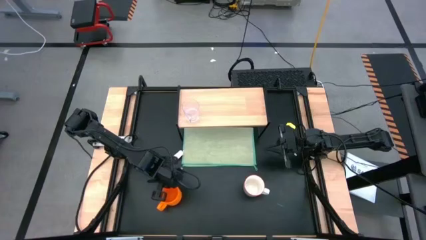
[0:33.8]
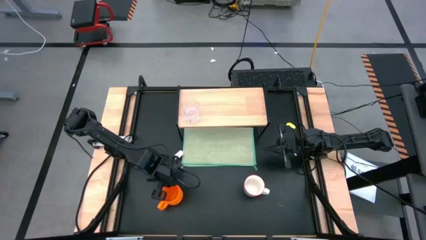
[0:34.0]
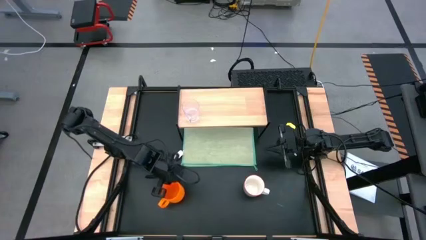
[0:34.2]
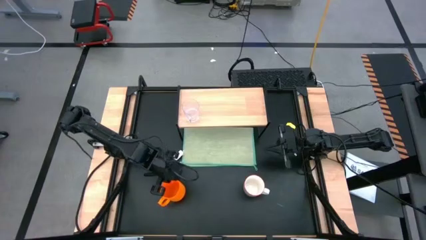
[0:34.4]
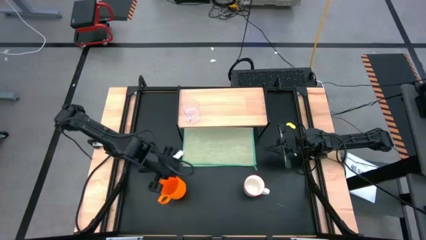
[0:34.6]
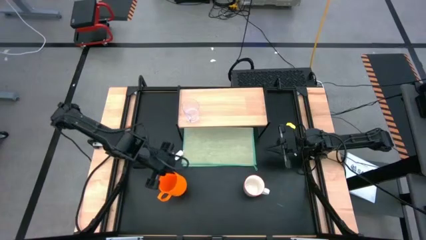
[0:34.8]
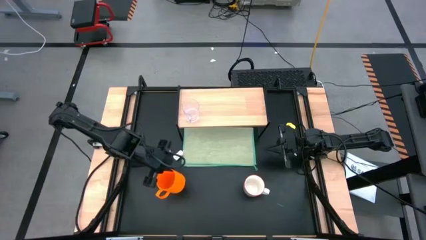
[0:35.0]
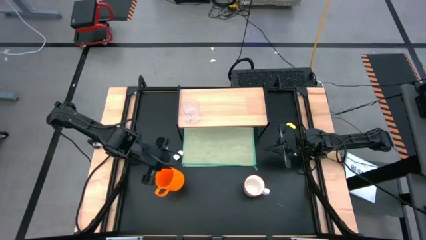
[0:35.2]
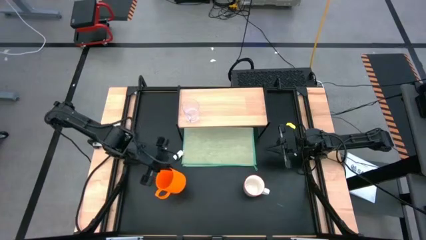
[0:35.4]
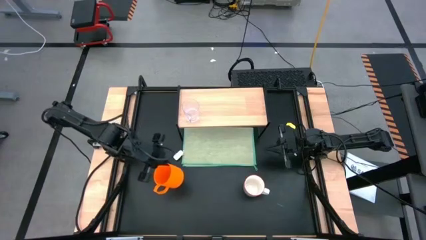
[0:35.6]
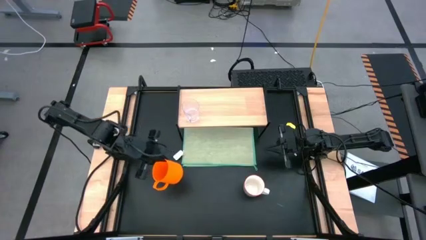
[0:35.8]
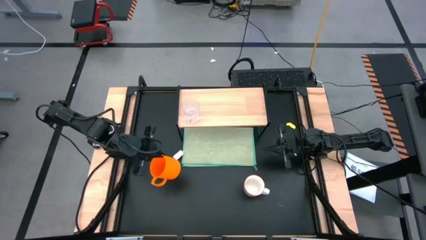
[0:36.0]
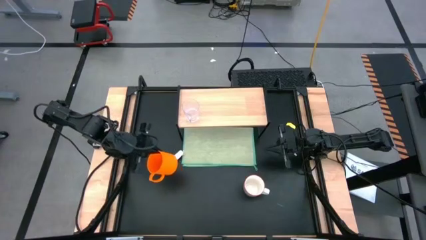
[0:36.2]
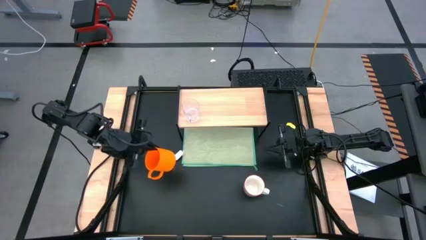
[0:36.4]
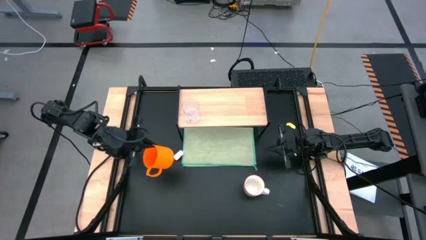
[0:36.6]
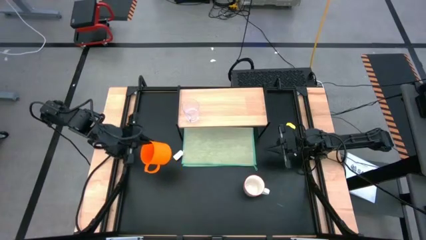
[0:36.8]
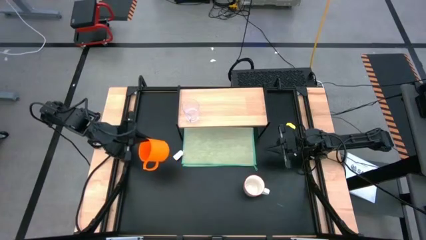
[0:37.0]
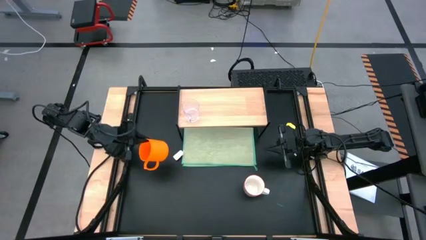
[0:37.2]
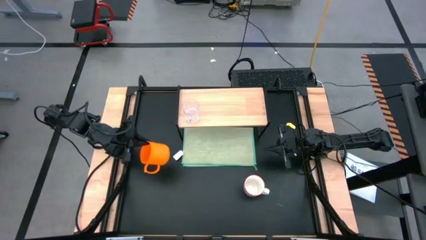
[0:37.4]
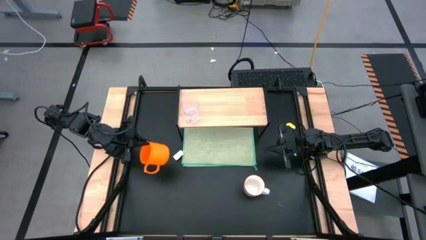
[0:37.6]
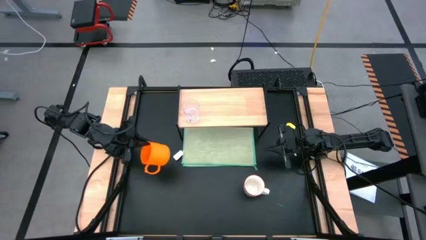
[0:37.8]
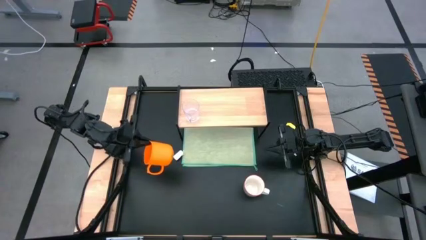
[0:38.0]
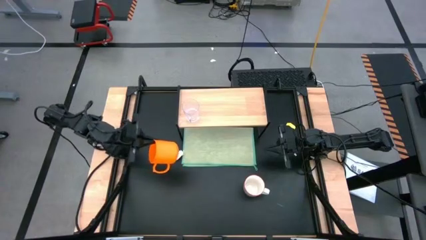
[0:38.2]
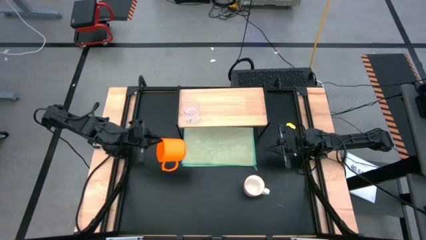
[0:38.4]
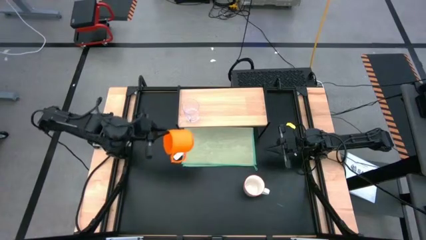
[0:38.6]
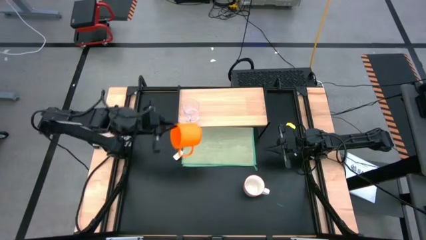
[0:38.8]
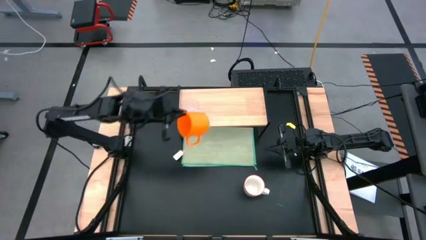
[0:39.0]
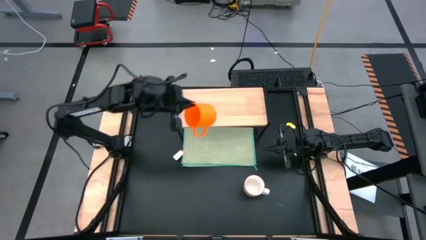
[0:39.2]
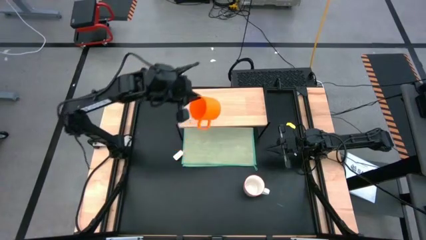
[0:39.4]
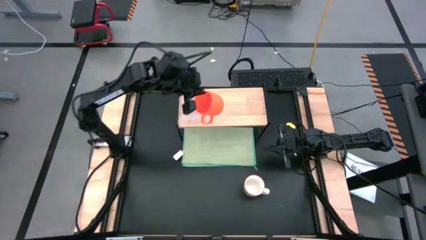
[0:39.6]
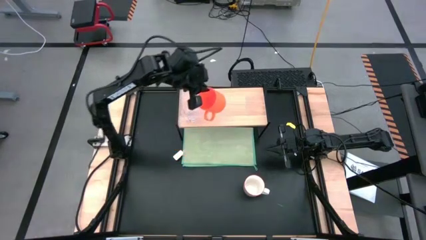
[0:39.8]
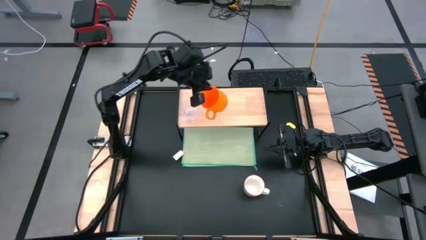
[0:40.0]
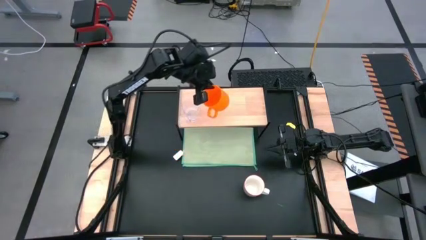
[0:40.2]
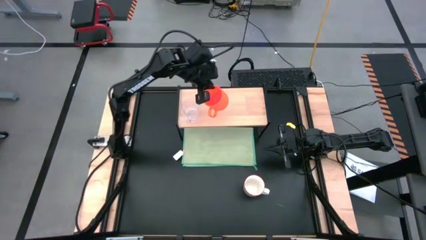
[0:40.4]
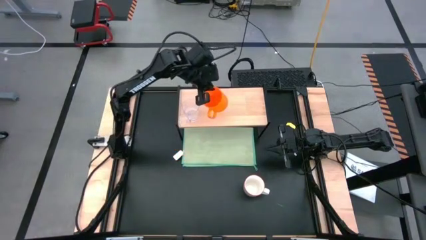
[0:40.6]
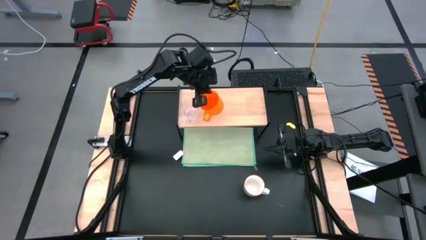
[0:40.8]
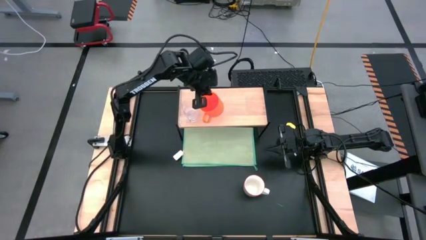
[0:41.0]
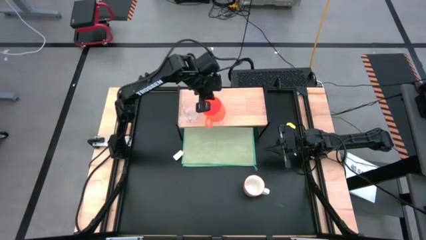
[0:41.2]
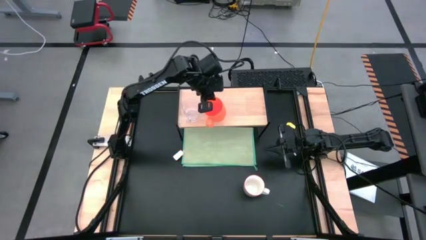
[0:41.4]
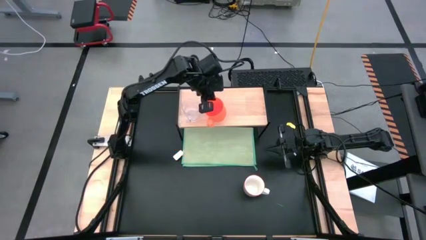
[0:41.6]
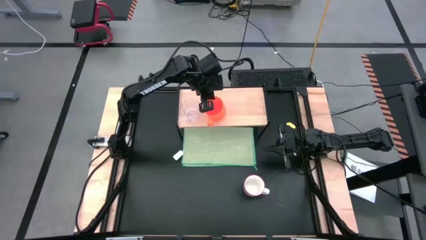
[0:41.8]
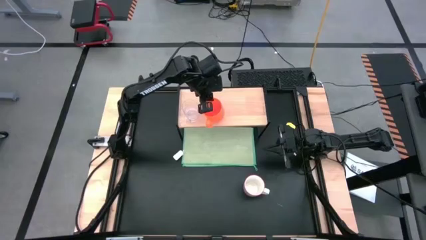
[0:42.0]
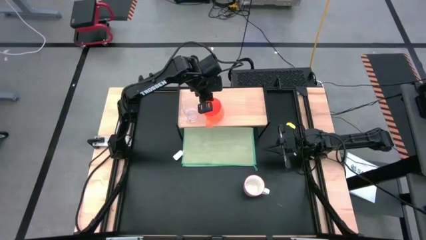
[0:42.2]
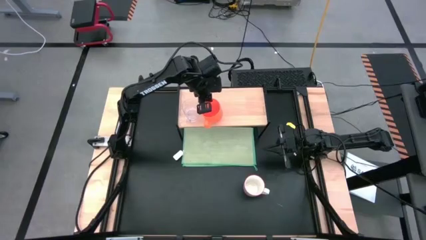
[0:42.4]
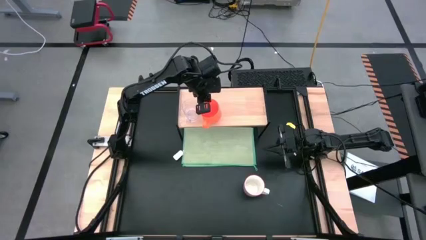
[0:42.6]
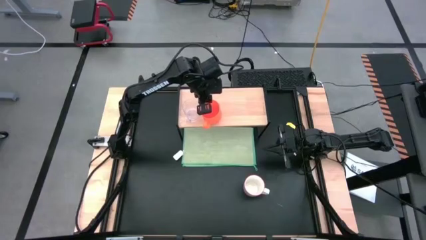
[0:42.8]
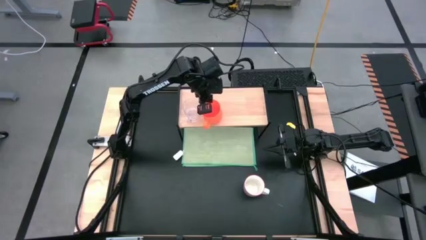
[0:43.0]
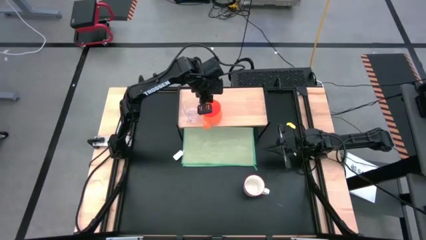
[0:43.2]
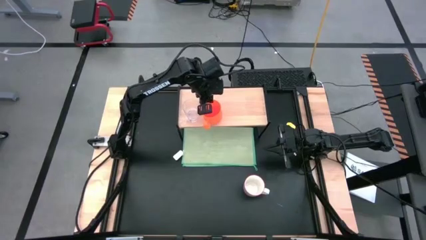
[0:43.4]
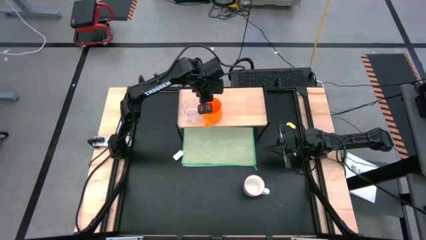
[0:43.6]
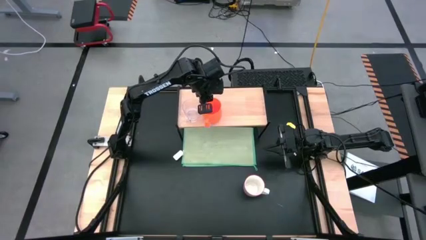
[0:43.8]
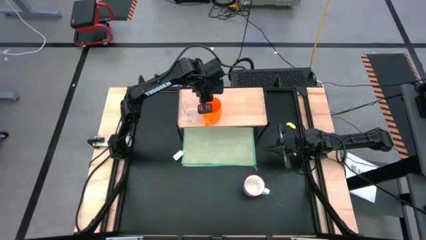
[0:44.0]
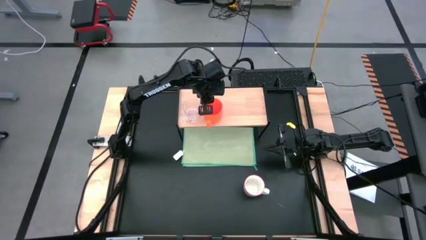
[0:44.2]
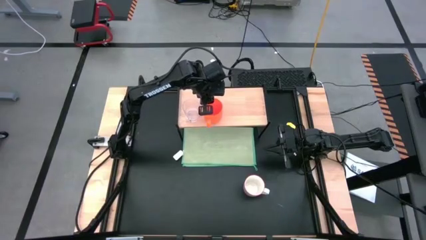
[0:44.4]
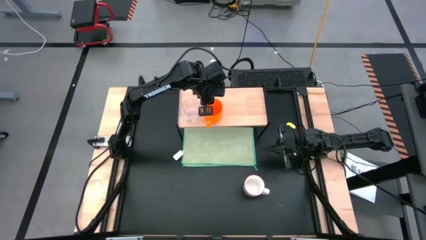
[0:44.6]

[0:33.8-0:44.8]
Task: Stack small to large cups/mugs on shelf
Put the orange mug on the shelf
